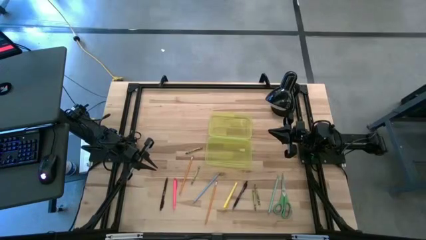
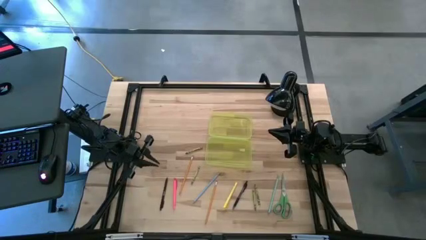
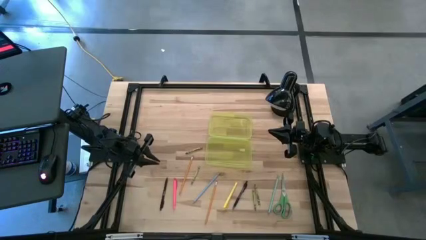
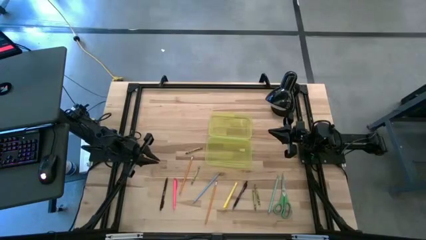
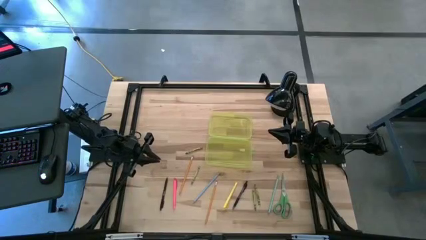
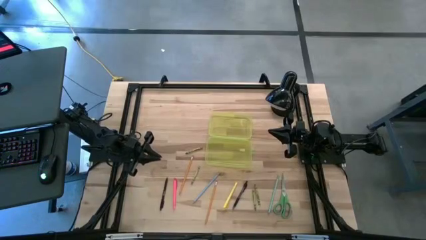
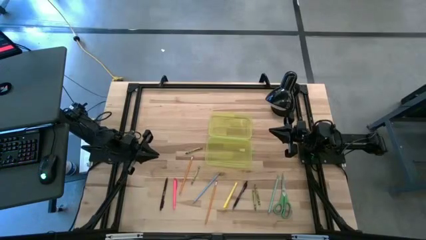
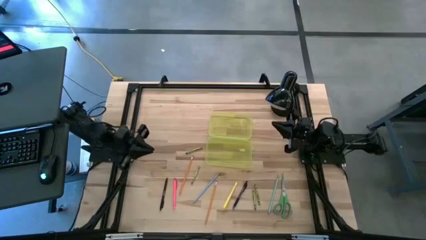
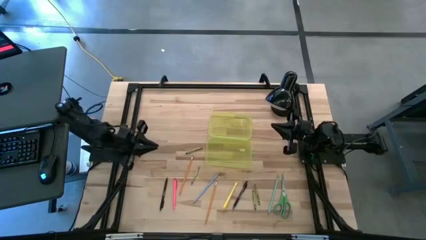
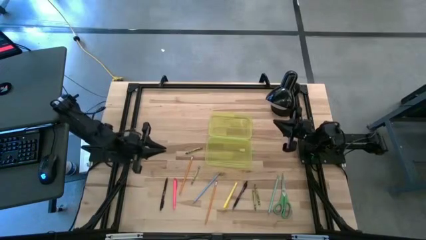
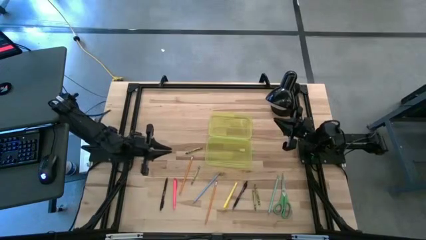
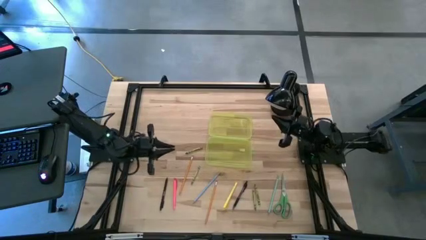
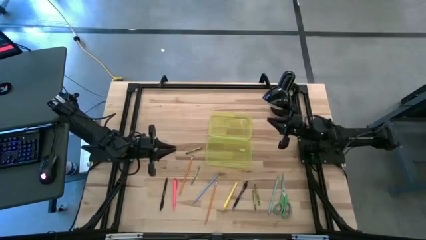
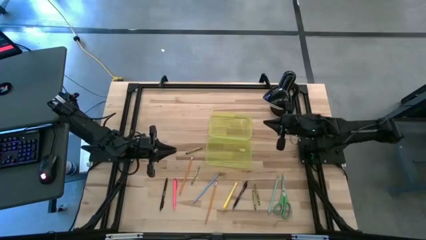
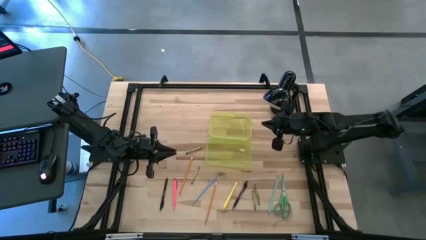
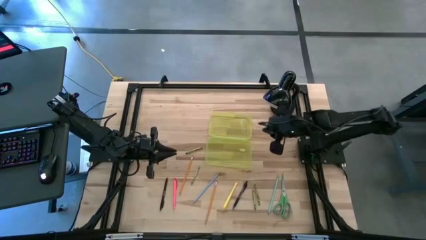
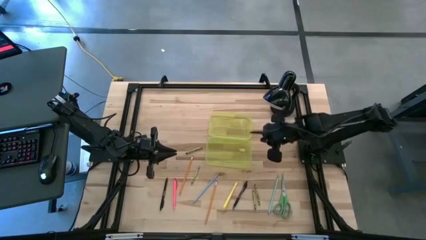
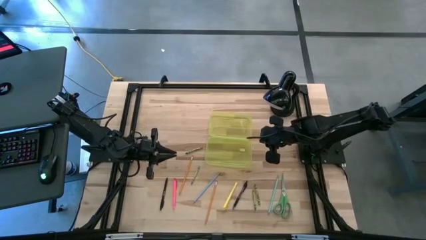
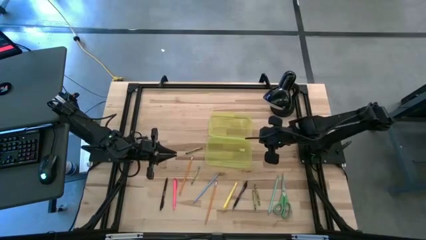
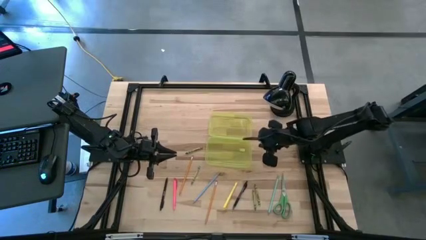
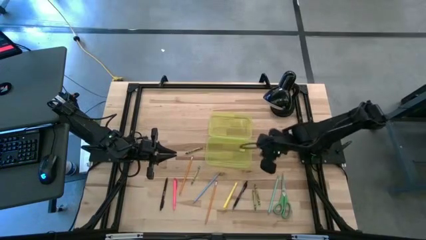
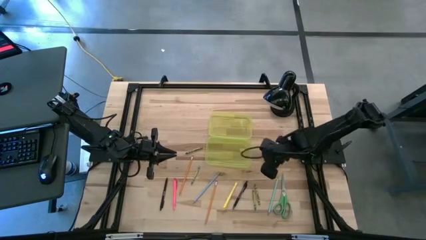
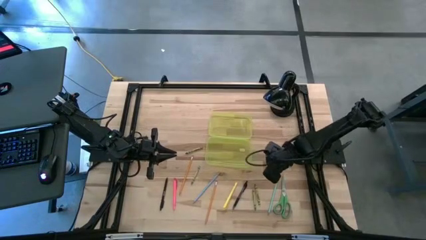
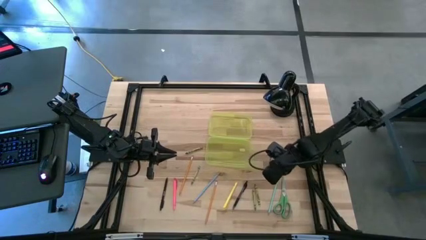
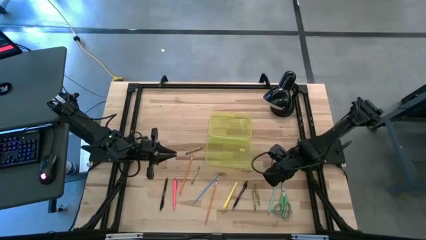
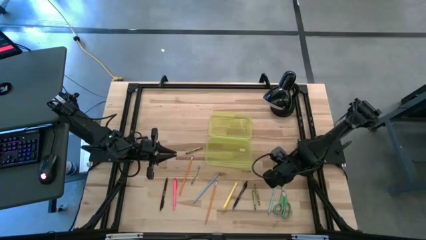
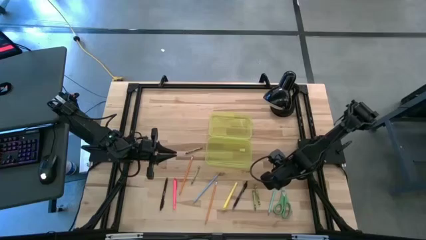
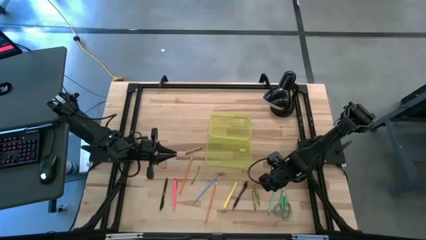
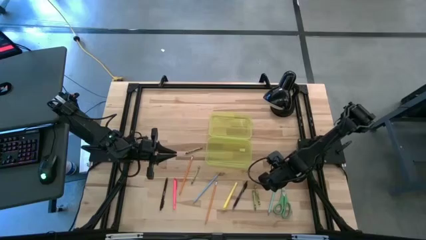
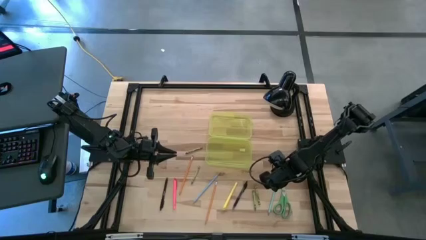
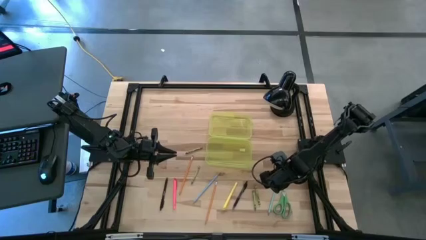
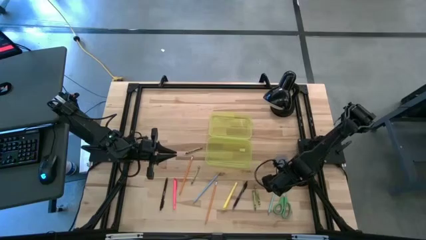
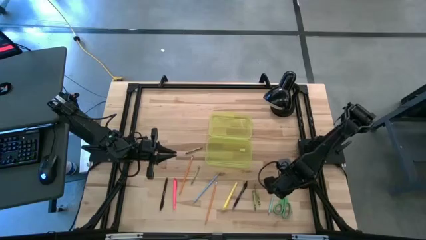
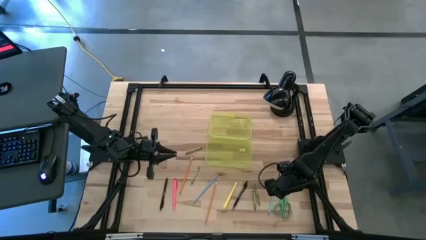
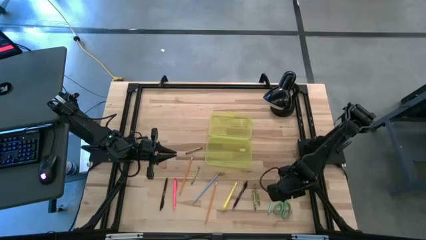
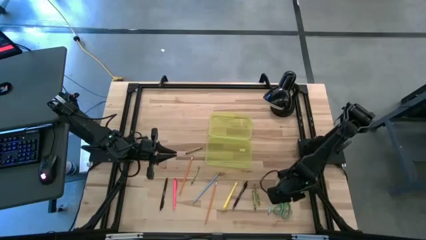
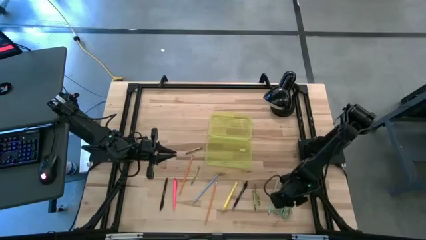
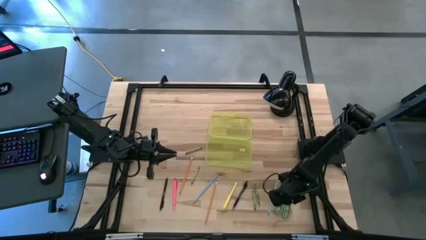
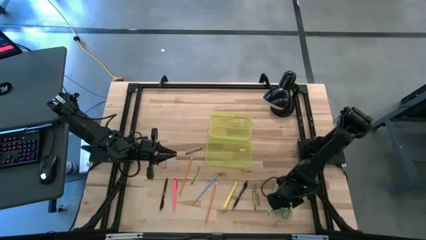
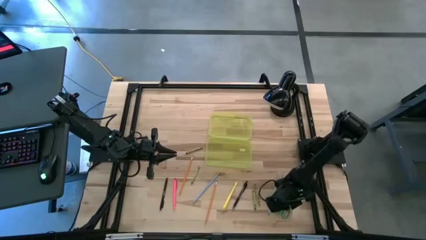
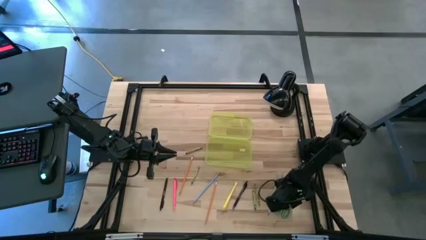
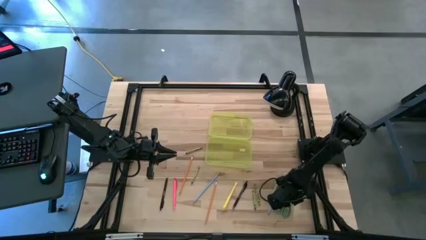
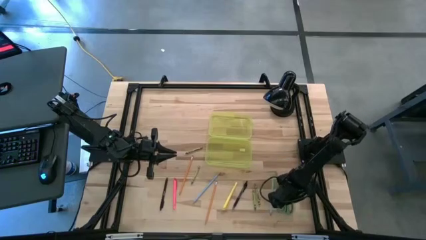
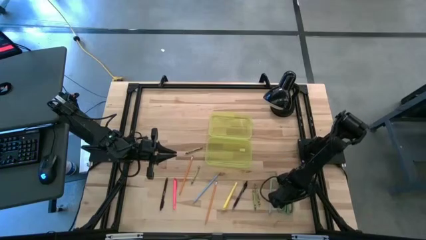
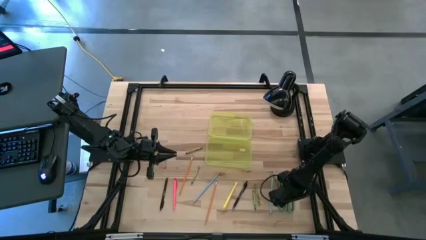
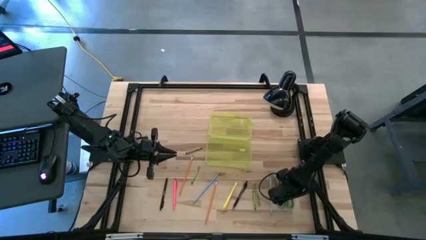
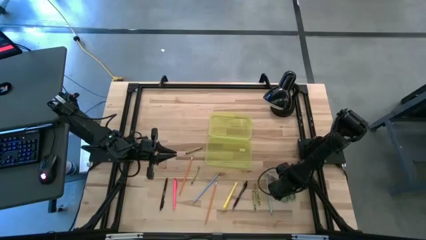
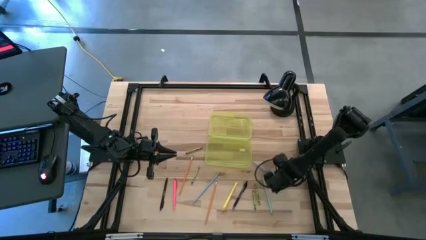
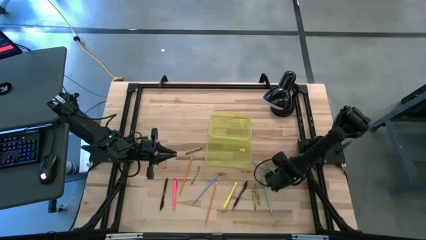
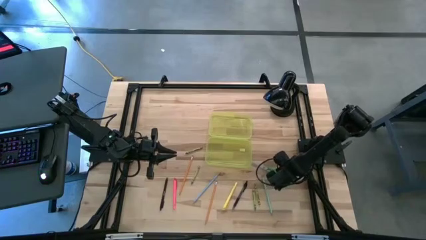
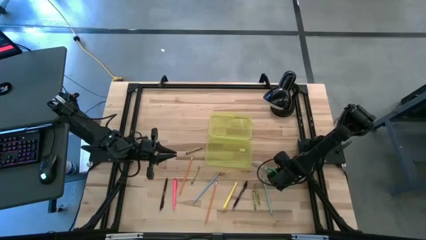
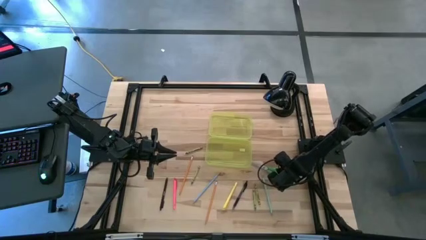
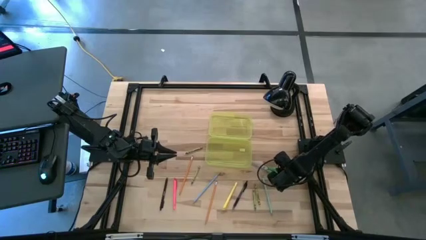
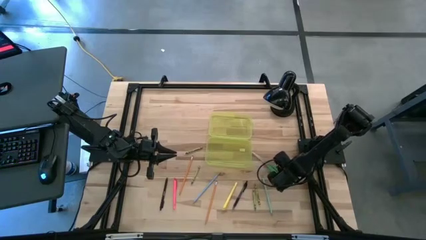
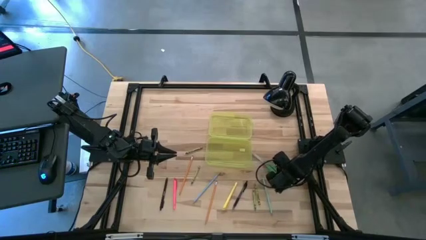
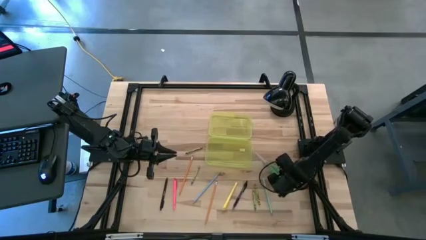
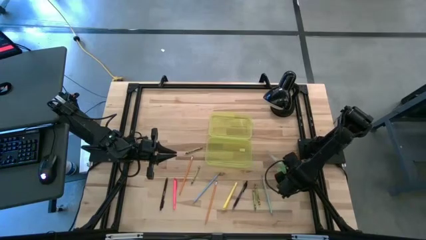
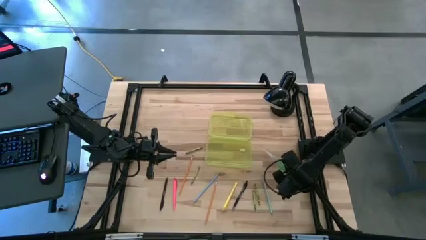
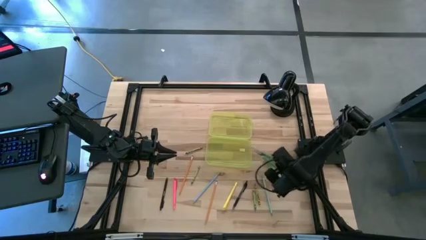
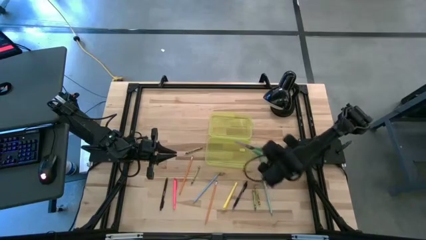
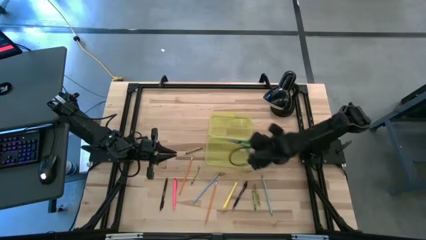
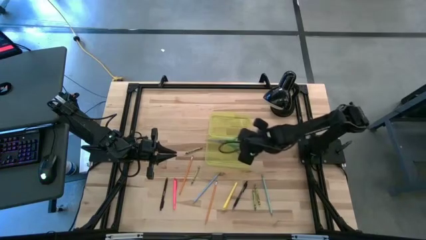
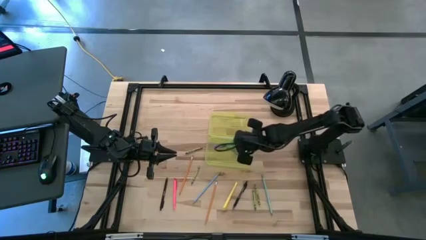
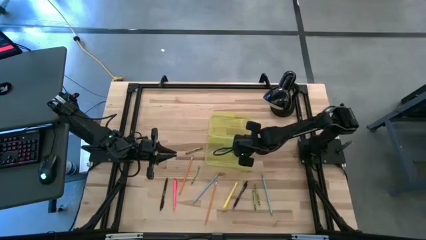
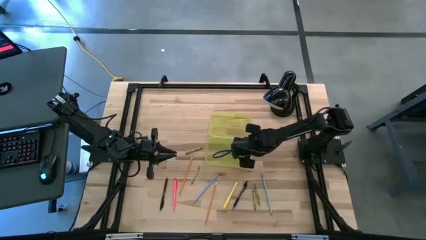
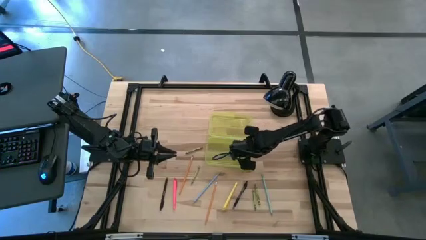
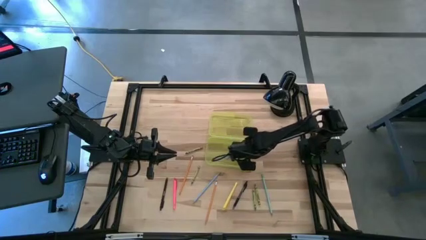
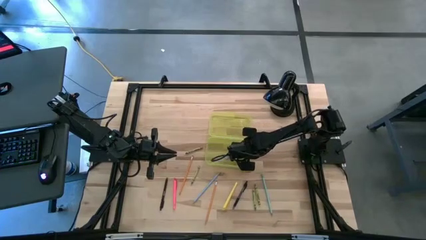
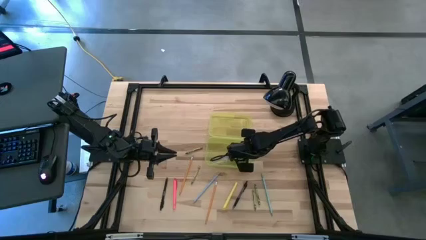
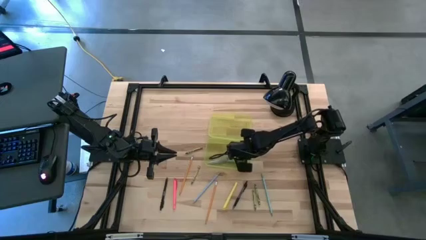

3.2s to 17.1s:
Task: Pick & place school supplies into a supply box
Put the green scissors into the yellow supply box
